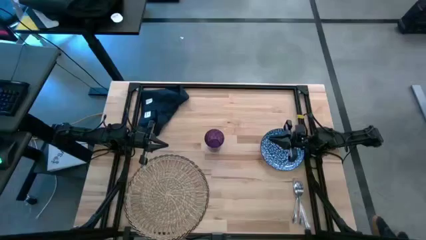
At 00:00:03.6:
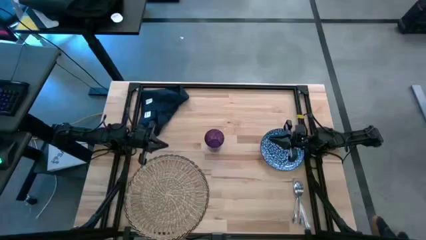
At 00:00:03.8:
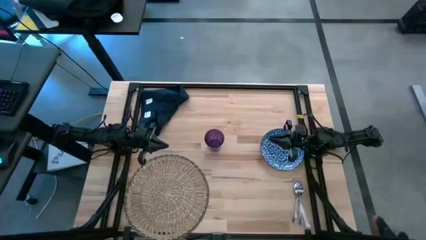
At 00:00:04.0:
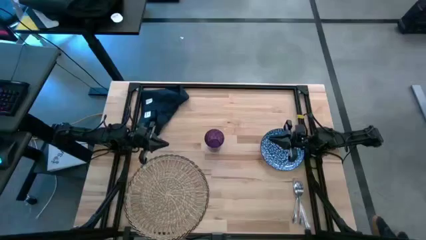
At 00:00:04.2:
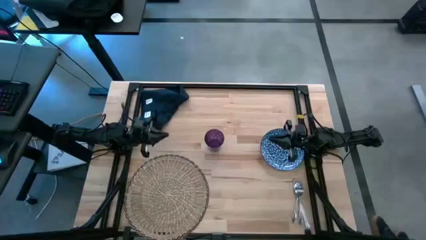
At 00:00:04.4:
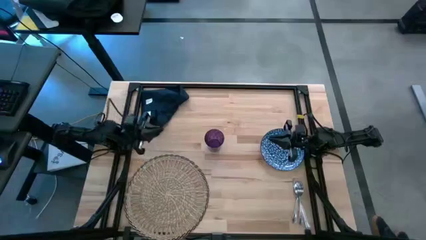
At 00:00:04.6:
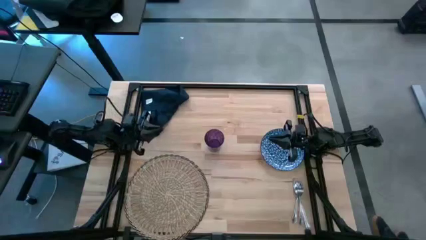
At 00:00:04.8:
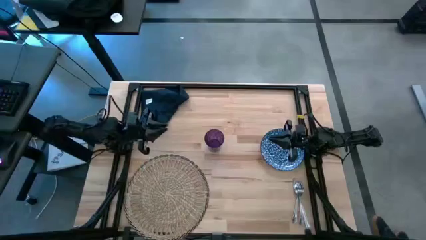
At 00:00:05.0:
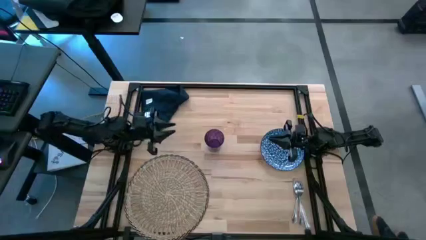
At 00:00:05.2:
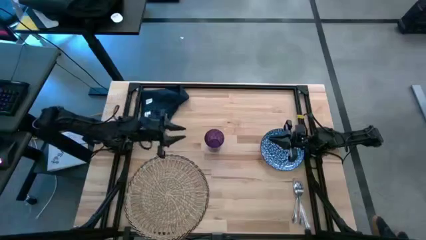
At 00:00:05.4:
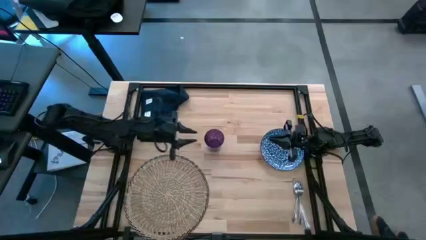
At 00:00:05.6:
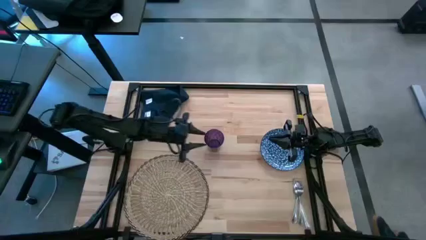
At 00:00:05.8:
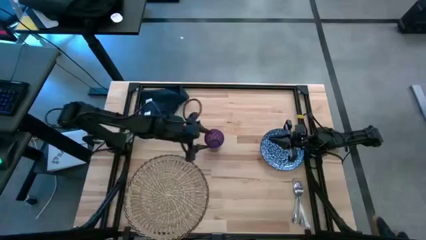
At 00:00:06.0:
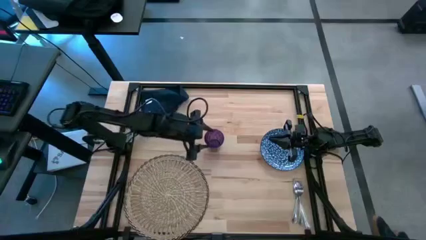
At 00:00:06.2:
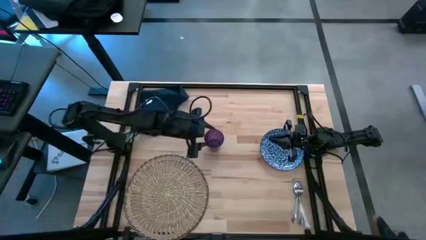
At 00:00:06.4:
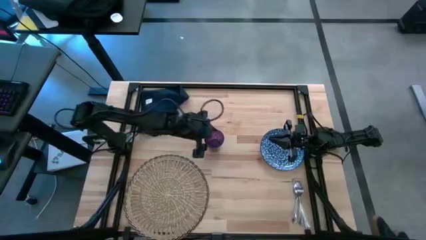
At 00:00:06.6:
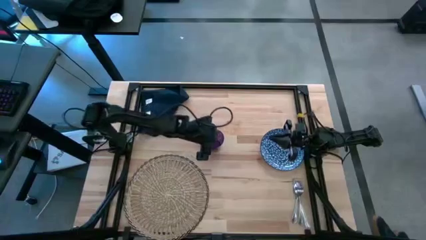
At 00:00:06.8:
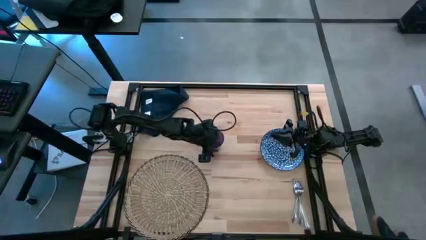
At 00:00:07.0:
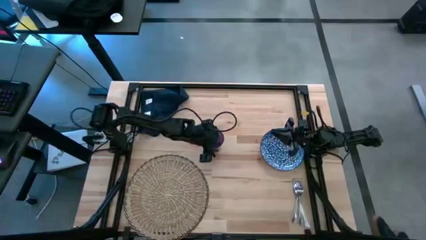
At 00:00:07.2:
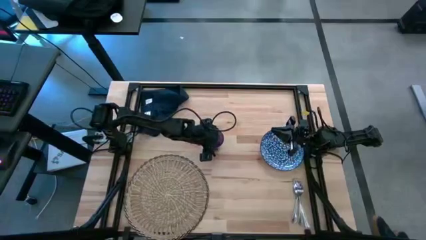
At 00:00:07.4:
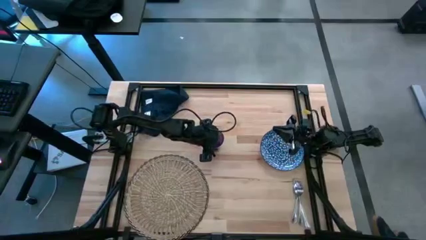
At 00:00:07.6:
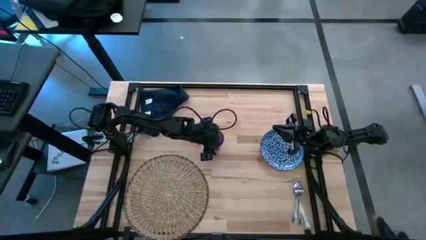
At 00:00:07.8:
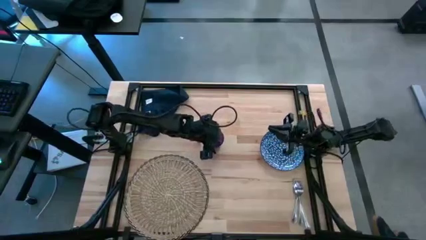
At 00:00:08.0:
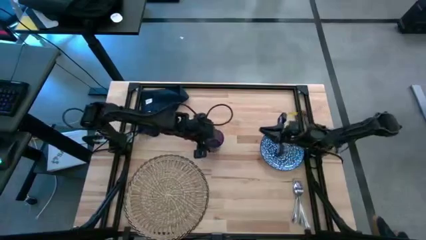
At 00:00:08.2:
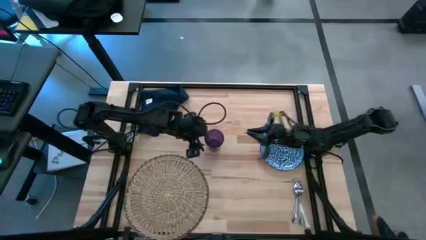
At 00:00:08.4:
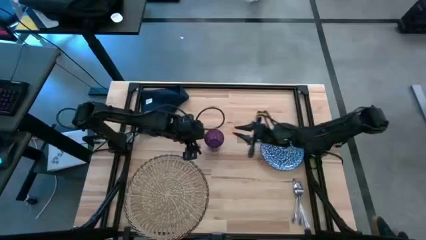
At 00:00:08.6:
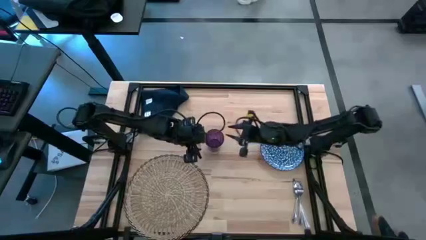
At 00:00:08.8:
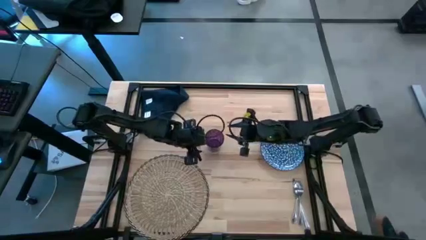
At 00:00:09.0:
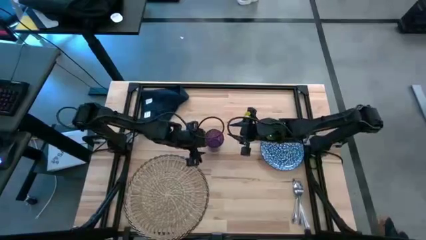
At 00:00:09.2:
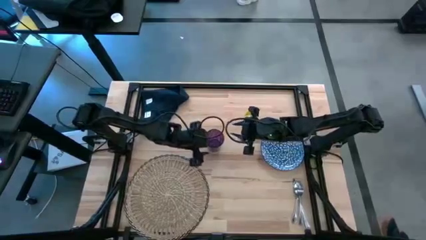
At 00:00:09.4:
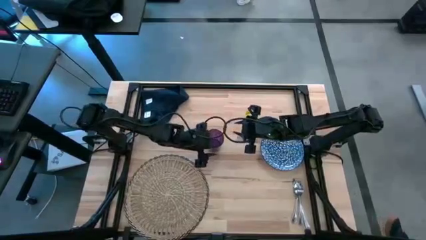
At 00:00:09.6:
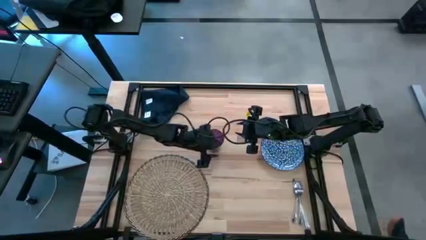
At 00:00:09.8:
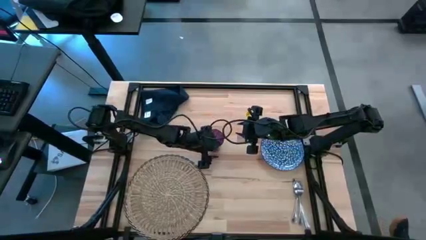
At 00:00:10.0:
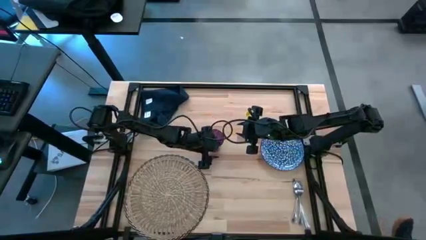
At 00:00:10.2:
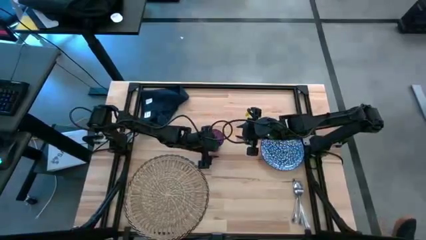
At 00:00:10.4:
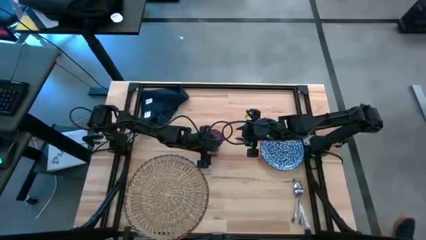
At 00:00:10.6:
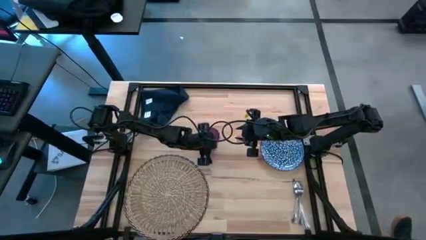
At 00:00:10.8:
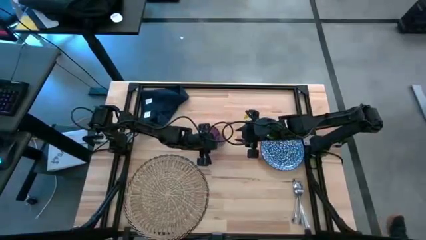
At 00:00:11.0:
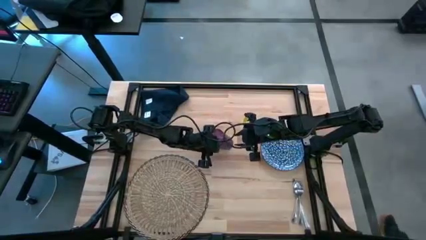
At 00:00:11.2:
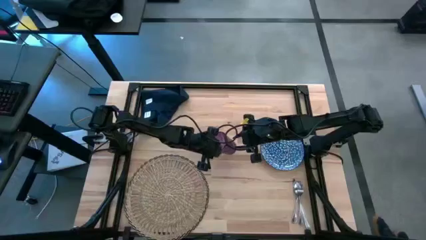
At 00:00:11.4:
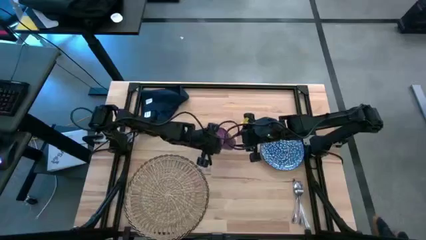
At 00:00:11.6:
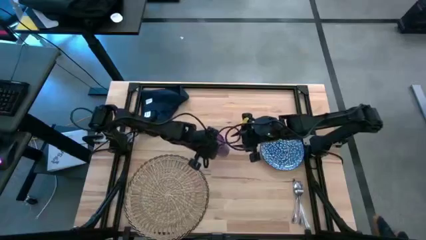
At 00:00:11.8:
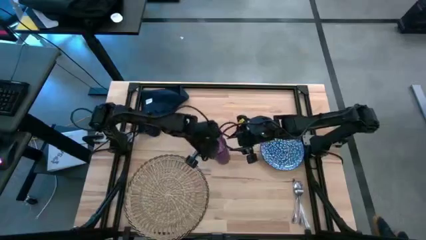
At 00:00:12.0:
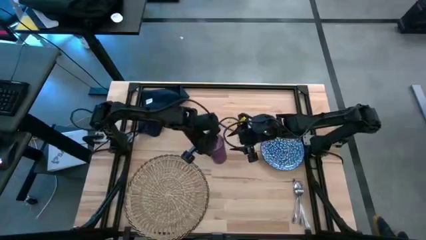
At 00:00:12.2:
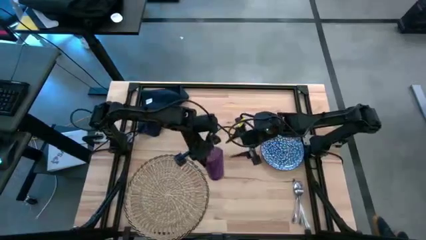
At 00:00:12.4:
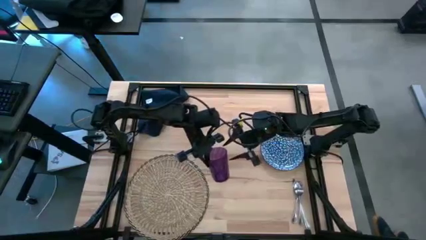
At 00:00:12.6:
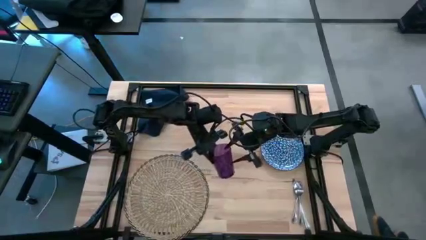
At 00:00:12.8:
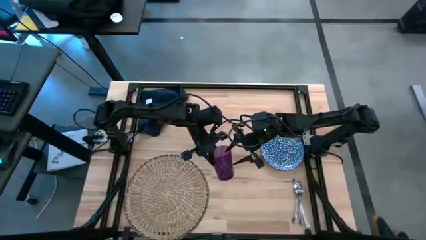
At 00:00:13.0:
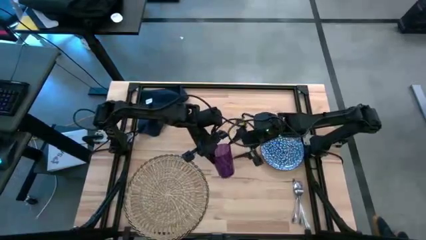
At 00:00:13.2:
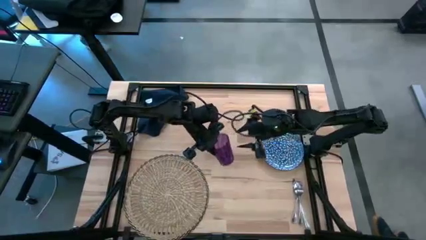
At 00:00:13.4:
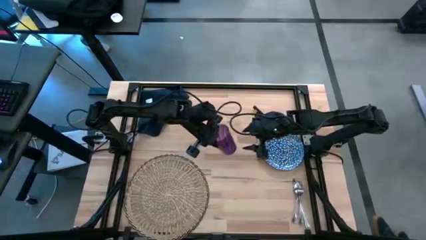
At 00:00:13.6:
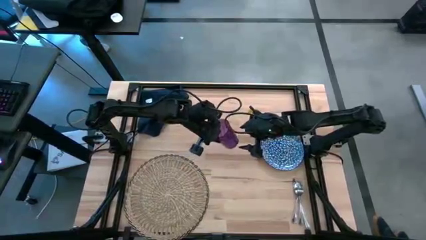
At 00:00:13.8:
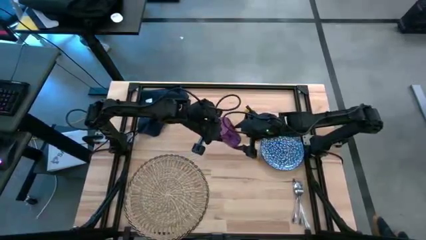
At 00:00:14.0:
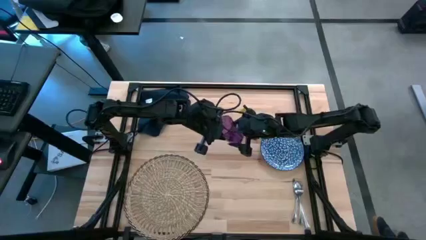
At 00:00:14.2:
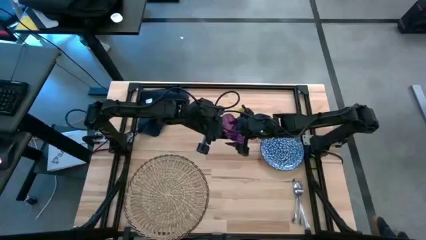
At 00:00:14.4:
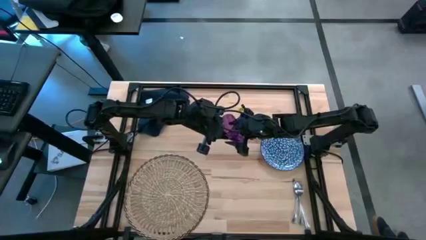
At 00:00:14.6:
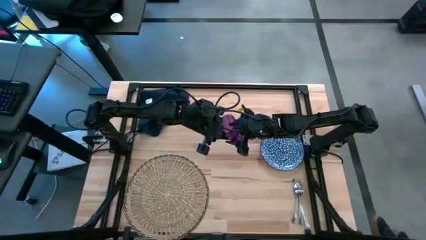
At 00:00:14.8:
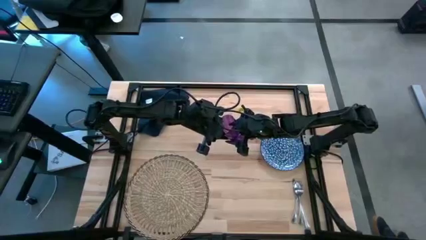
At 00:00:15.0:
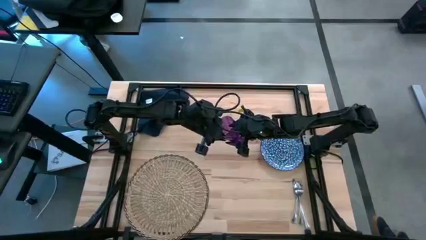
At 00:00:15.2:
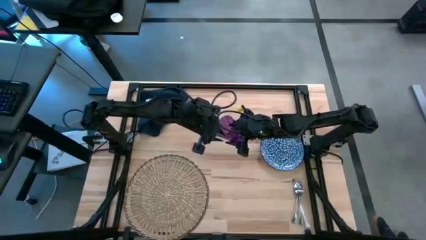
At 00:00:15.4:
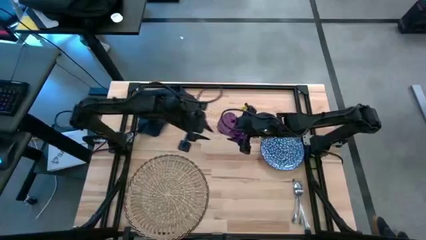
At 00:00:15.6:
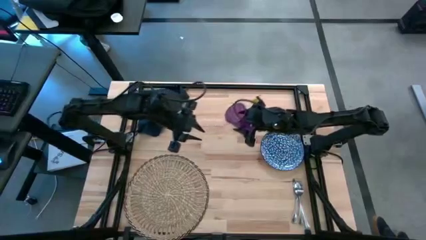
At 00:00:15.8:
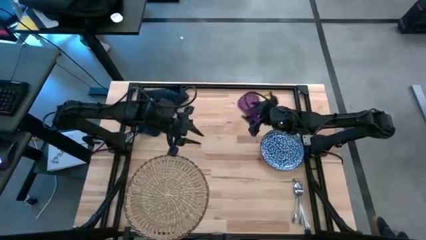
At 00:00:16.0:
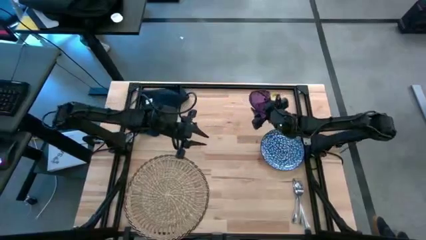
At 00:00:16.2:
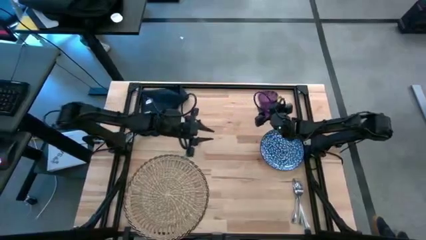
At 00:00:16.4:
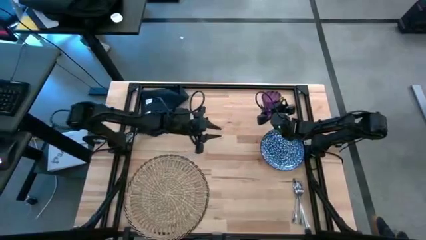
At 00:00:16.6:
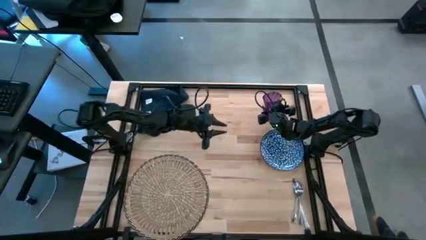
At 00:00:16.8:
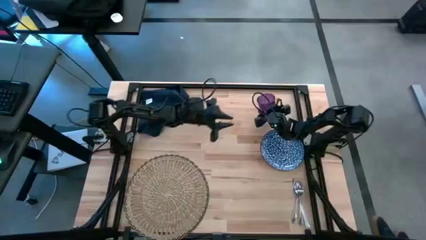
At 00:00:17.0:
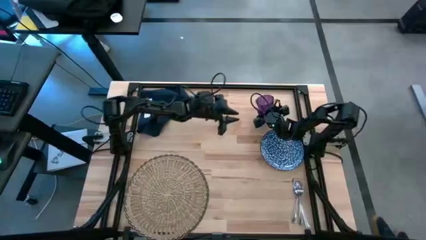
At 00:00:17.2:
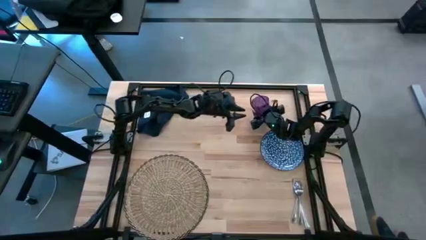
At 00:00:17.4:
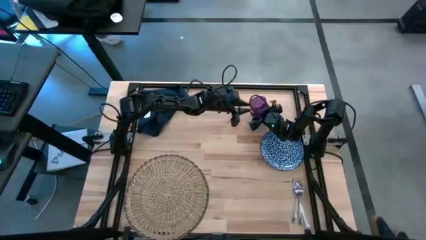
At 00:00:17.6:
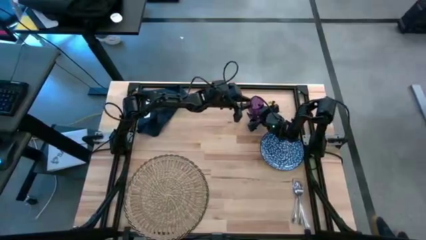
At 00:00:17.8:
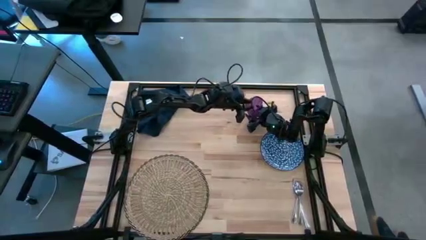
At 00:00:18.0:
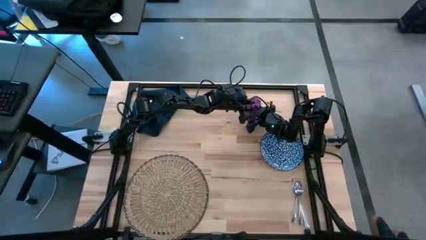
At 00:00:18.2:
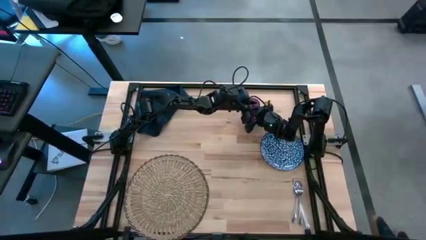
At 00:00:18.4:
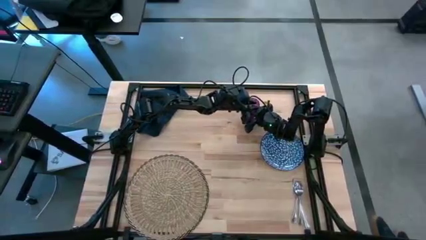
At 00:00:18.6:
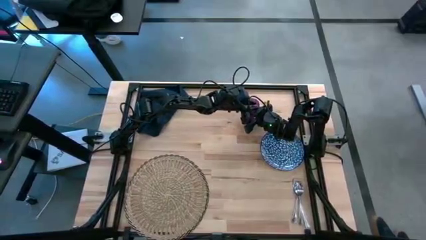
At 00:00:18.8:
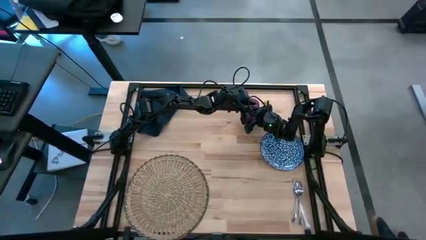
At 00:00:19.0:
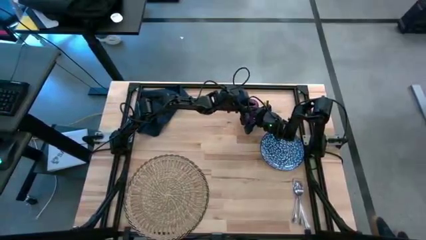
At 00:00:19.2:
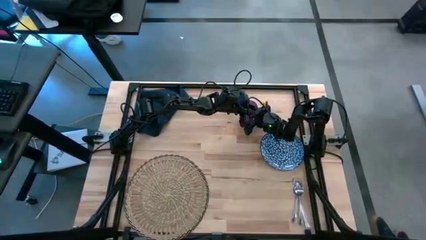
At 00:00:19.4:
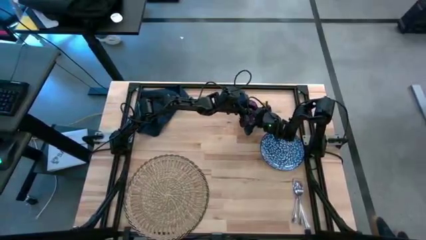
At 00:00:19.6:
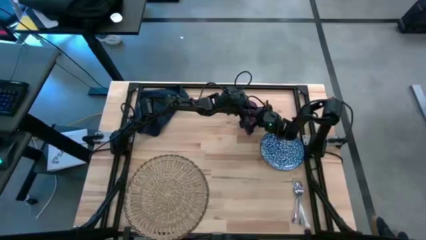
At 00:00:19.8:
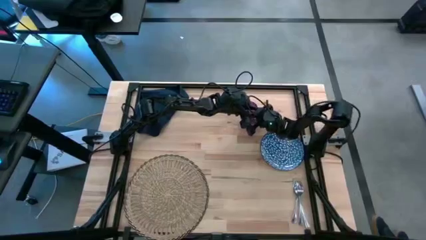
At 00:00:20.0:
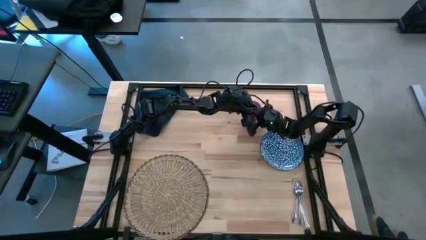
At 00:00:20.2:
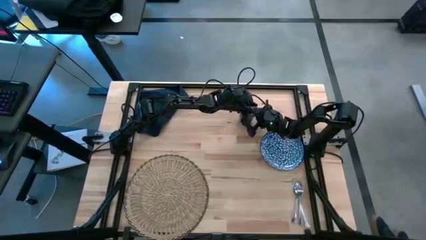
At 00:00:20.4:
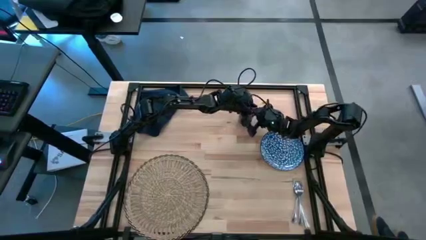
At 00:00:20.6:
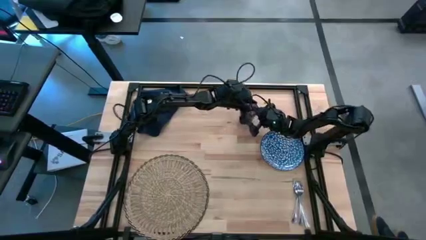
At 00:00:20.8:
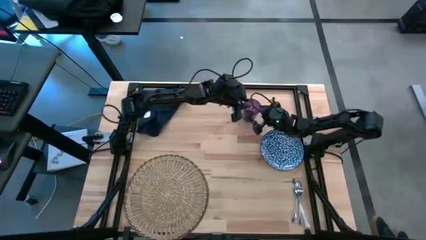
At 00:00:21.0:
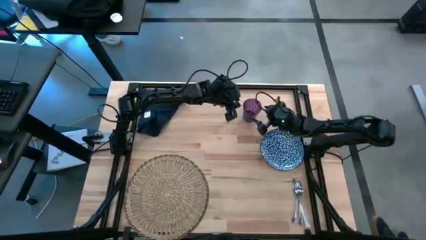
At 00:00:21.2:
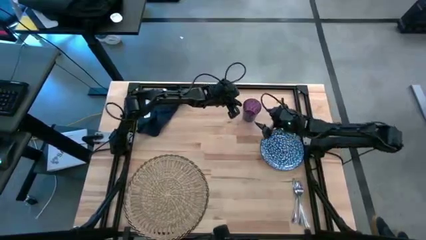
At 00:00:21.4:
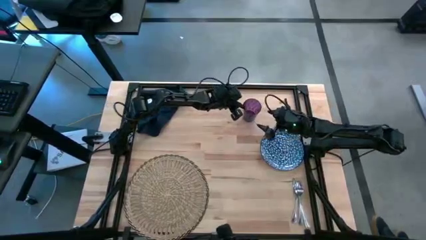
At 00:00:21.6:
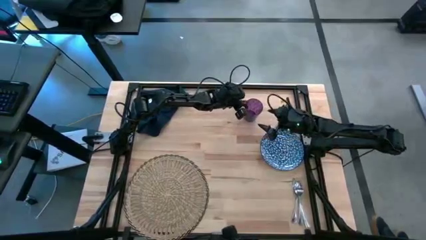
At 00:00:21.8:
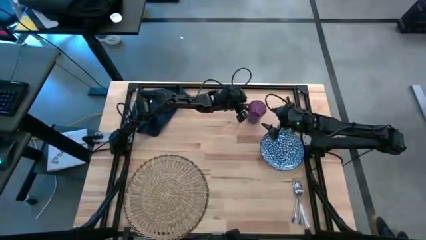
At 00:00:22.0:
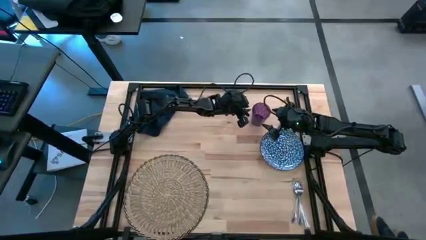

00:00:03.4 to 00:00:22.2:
Task: Set table place
Move the purple cup to the top right of the table
